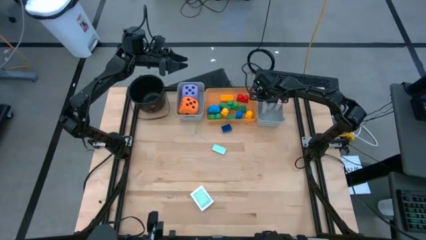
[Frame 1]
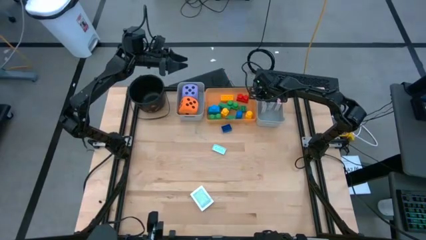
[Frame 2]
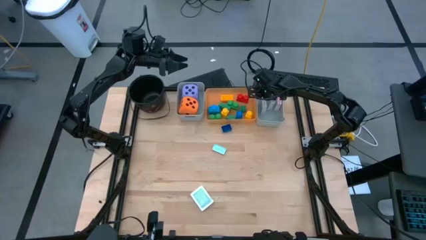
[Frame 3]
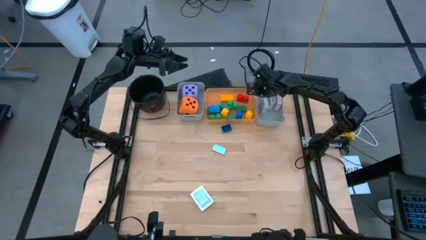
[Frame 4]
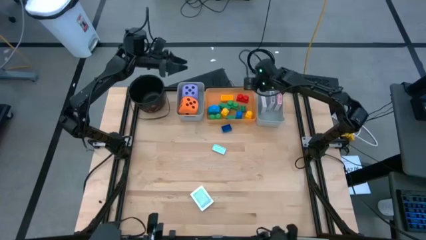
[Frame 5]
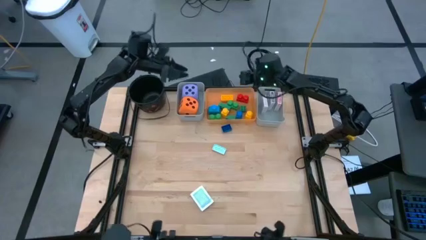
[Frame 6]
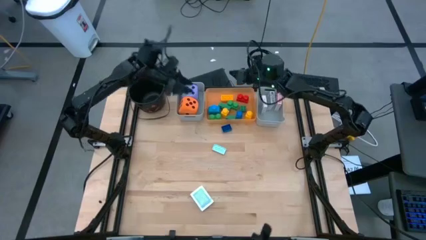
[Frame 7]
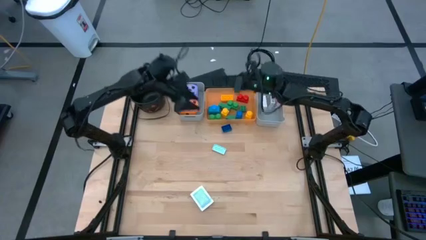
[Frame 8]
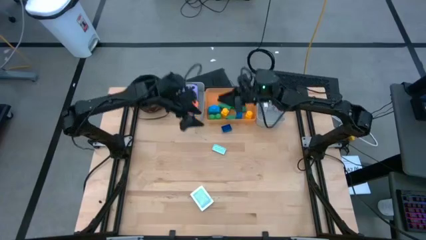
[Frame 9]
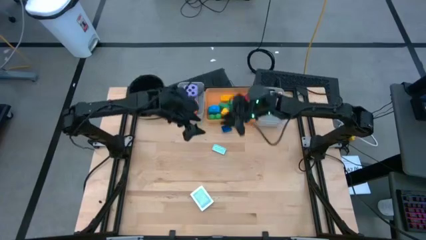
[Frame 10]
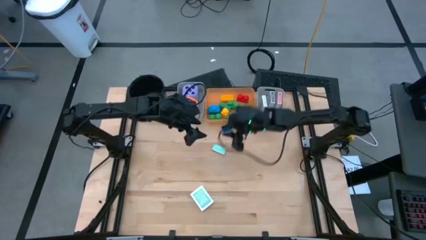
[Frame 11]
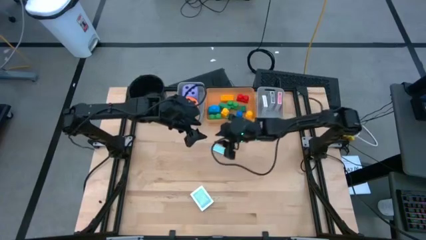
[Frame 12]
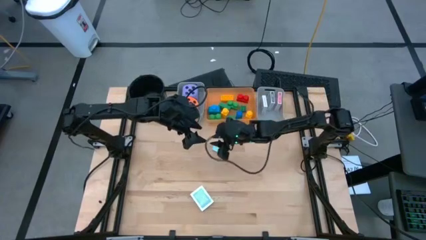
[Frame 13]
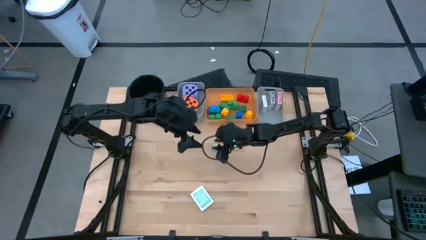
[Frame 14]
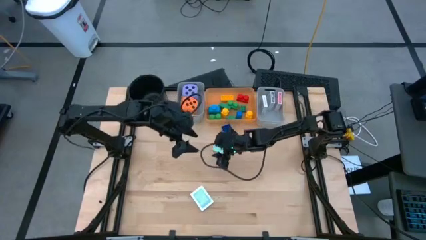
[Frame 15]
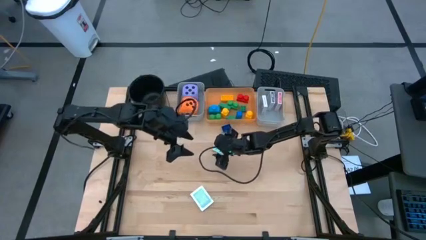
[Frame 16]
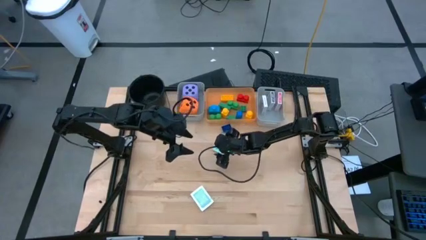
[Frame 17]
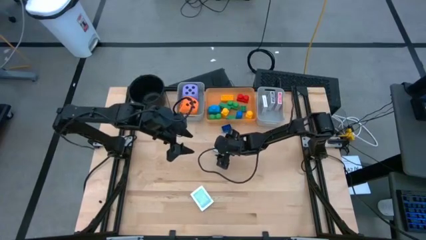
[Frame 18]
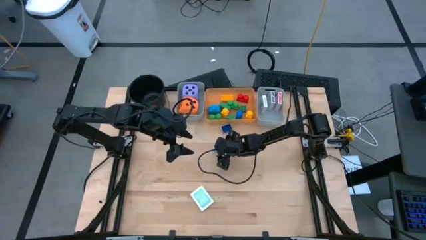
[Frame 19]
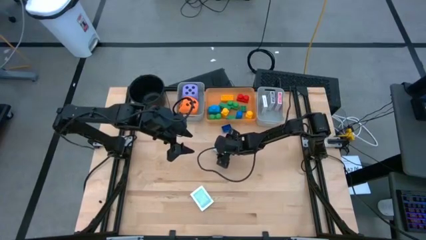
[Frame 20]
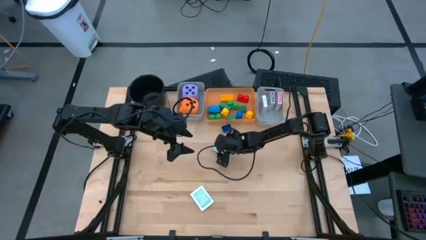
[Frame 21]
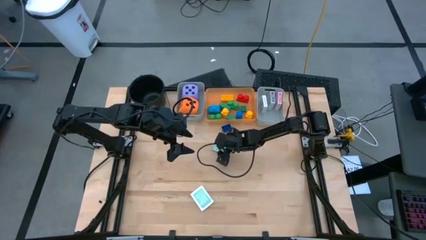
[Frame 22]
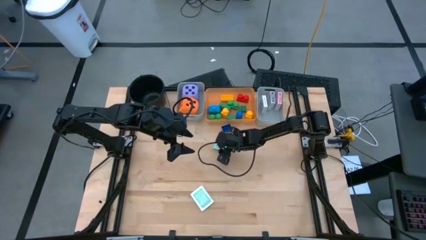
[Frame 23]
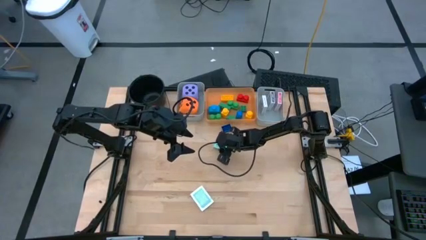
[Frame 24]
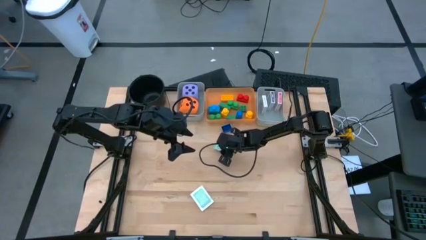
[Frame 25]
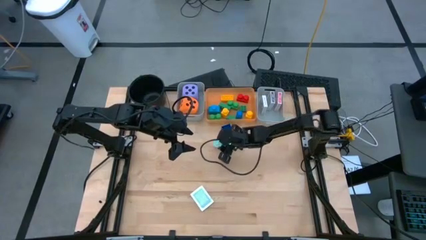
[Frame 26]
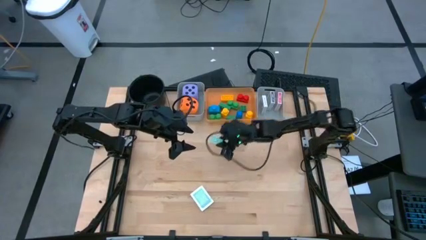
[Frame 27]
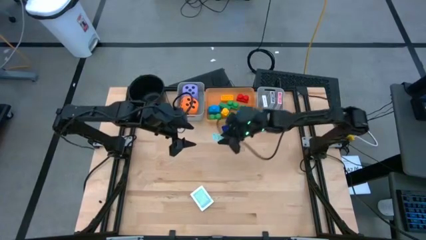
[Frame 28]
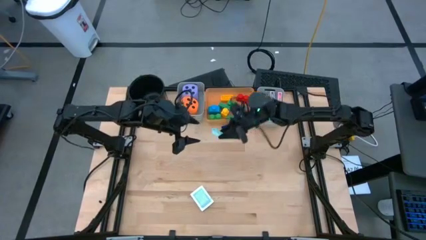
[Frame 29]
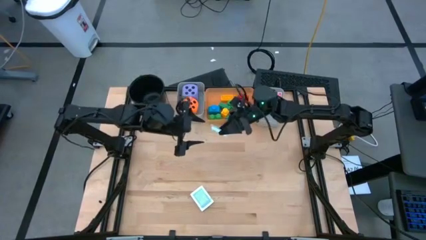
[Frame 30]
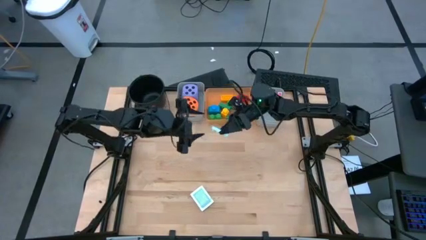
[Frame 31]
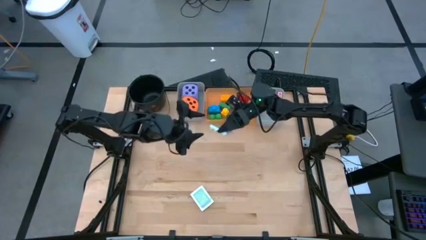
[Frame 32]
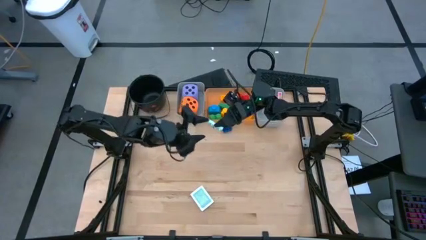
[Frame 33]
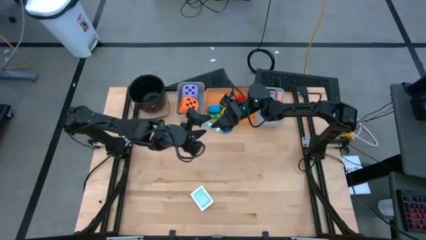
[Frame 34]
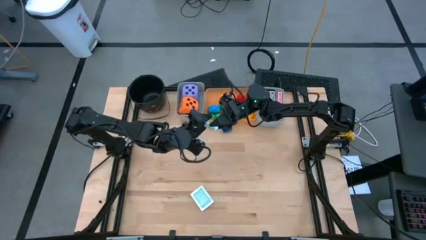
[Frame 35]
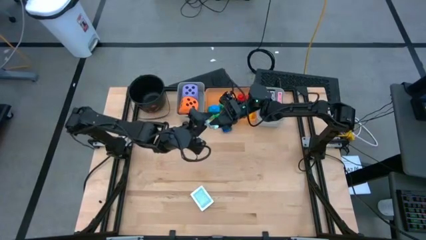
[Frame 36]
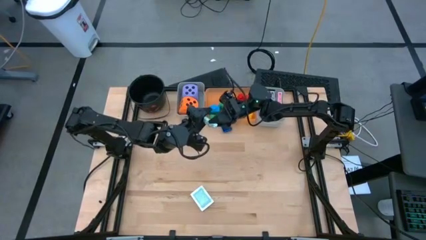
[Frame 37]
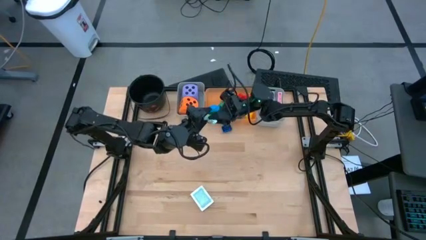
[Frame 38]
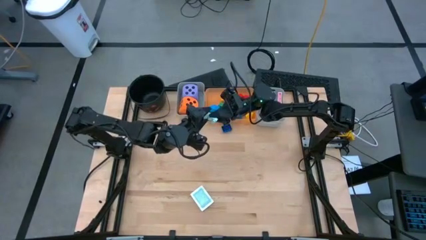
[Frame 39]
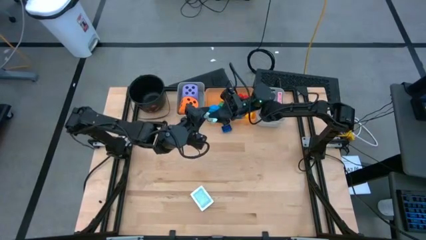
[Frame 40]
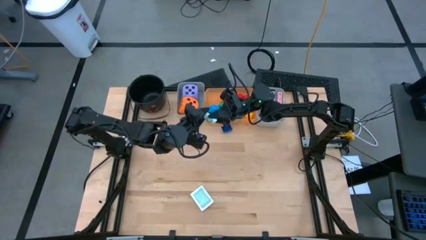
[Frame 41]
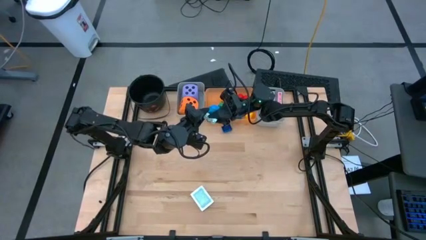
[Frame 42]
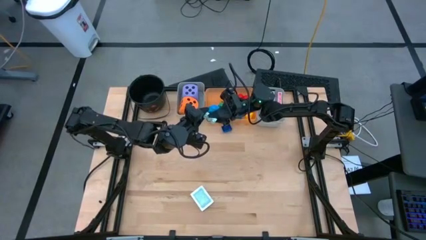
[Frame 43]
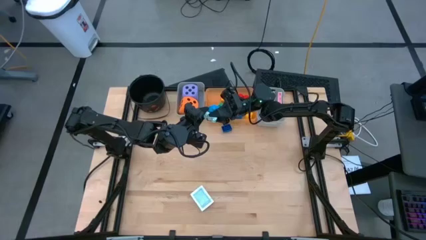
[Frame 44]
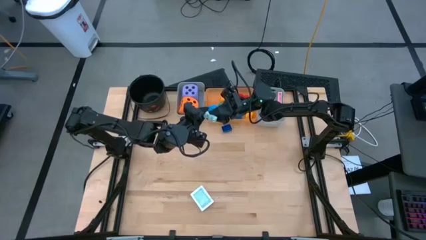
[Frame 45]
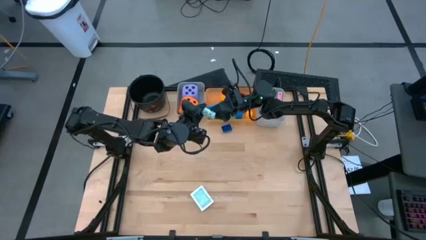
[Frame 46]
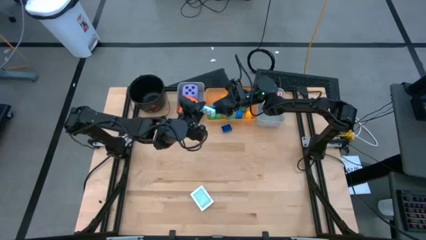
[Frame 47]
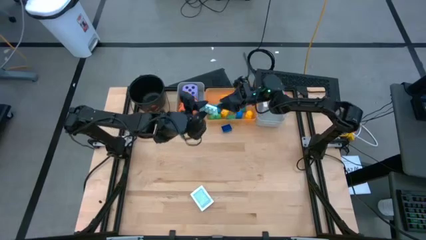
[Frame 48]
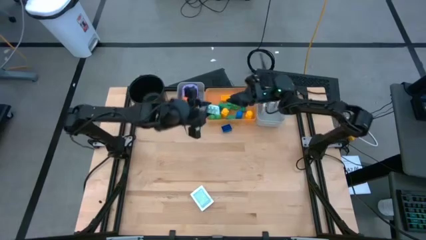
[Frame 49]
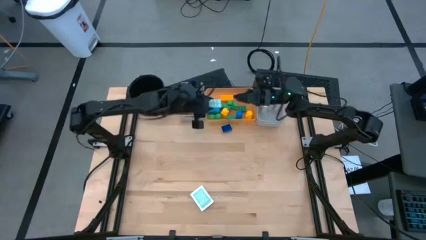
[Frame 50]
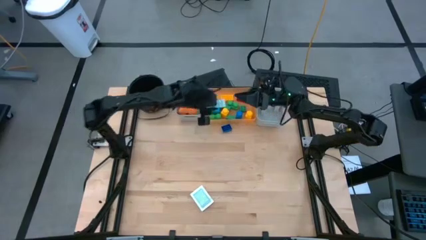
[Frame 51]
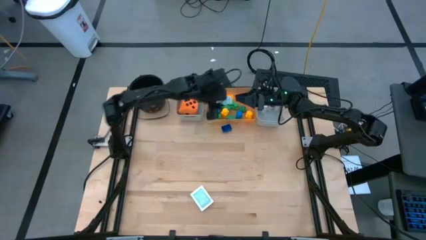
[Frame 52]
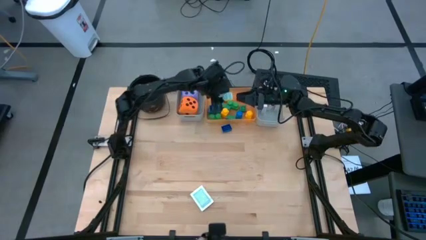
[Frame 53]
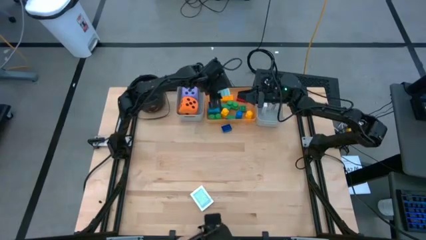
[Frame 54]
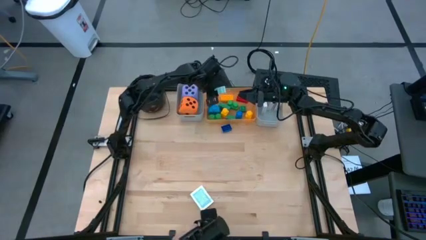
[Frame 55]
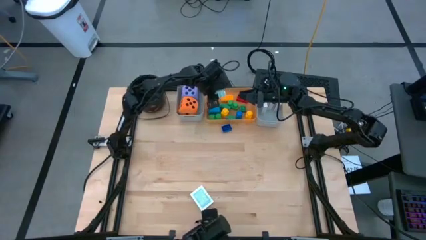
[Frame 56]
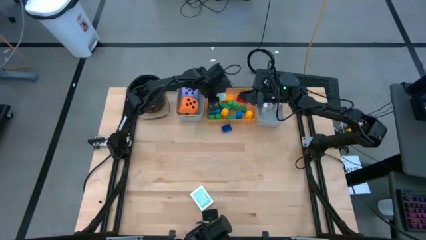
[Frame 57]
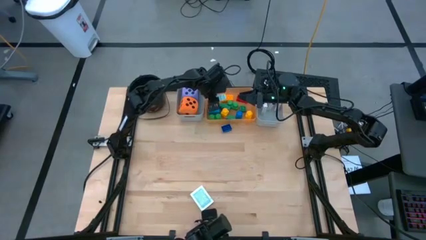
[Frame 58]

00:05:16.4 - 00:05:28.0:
Task: Pick & Place Toys
Put the light blue game piece into the orange bin
